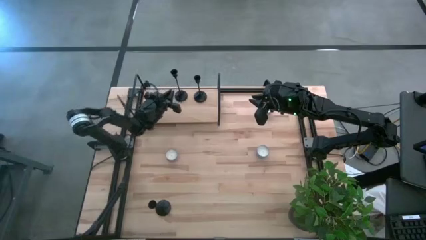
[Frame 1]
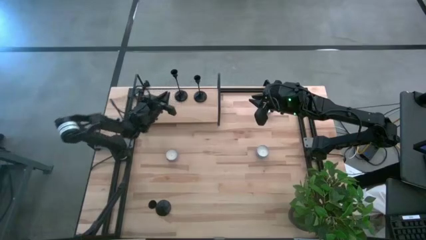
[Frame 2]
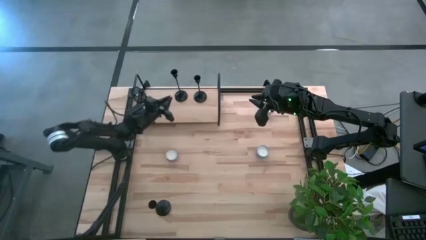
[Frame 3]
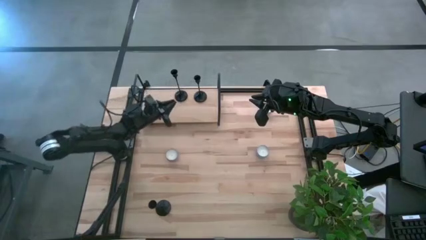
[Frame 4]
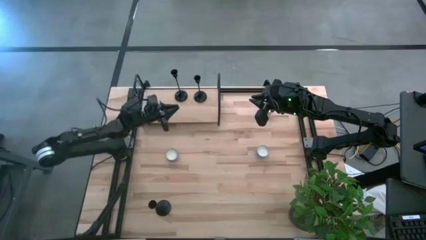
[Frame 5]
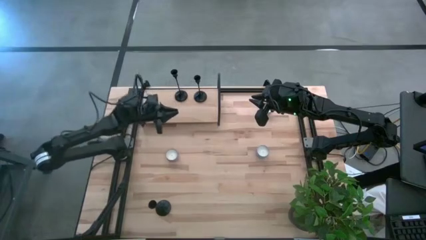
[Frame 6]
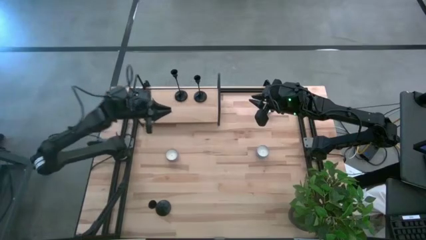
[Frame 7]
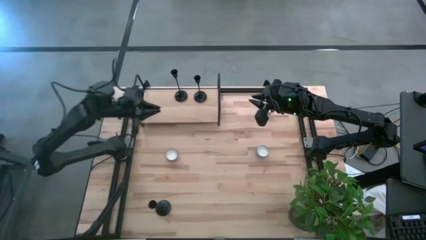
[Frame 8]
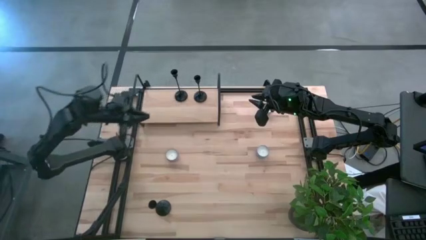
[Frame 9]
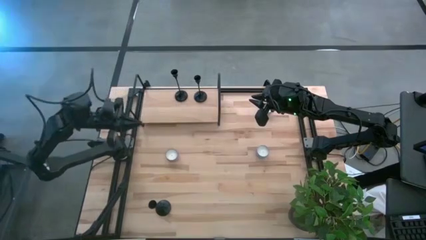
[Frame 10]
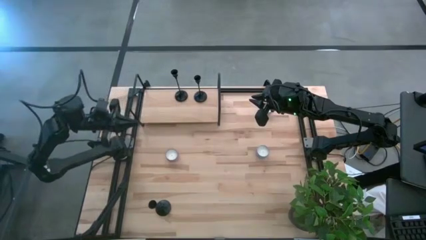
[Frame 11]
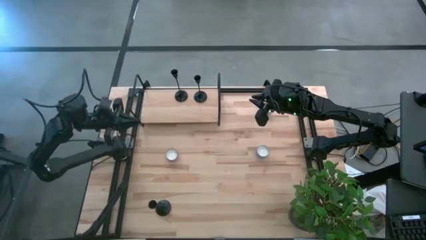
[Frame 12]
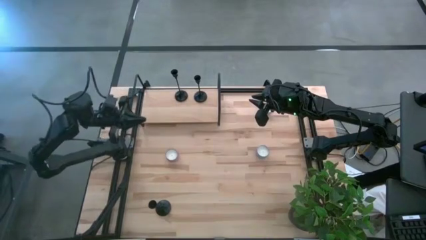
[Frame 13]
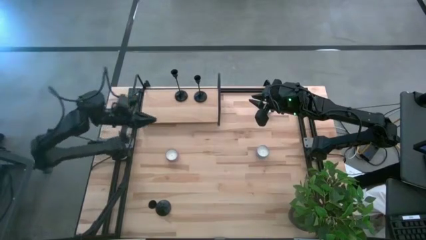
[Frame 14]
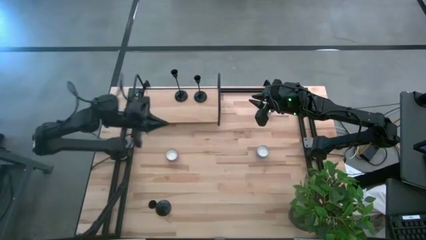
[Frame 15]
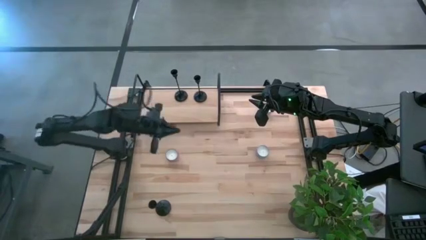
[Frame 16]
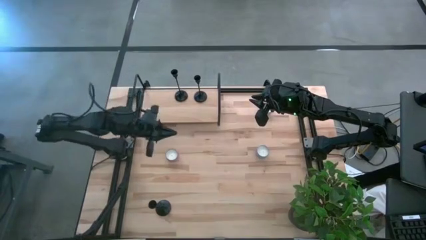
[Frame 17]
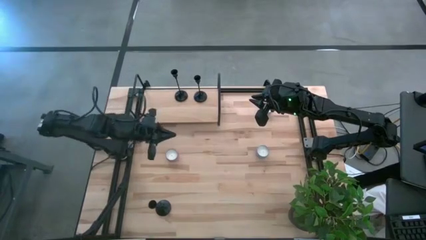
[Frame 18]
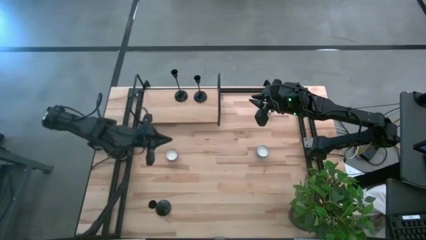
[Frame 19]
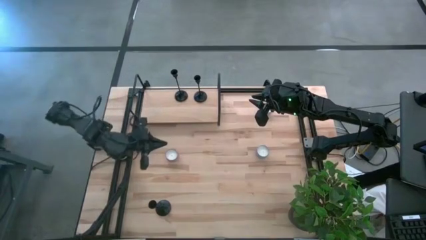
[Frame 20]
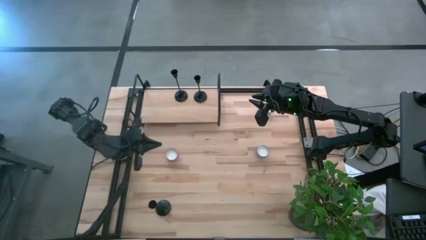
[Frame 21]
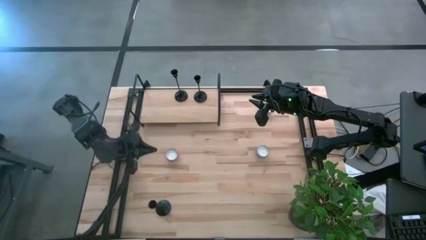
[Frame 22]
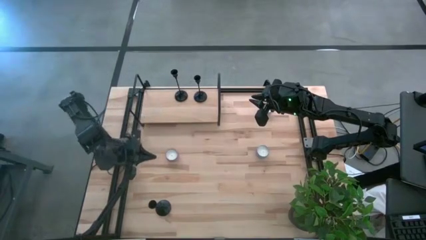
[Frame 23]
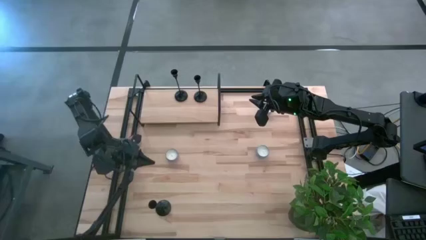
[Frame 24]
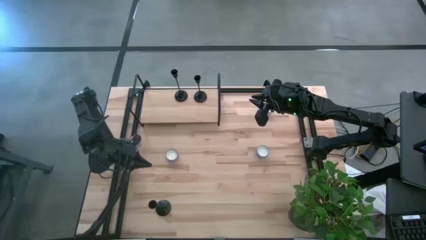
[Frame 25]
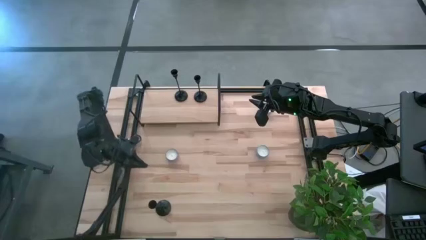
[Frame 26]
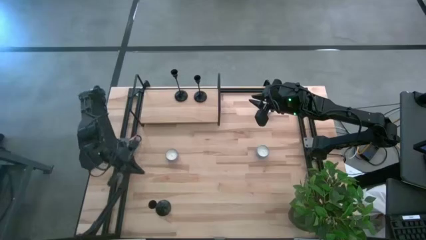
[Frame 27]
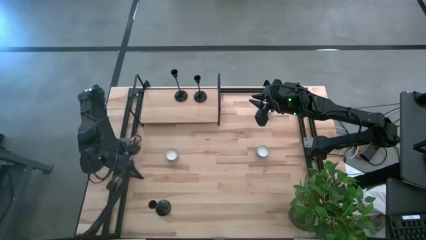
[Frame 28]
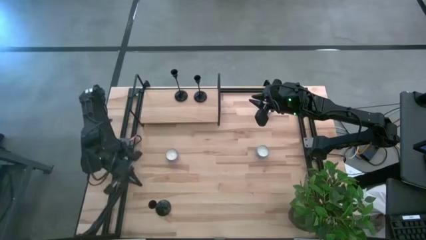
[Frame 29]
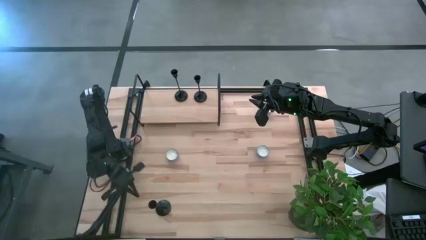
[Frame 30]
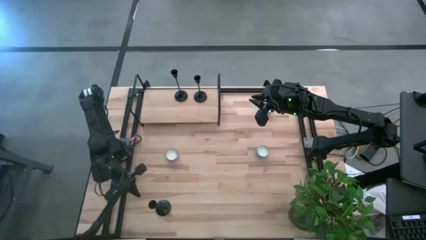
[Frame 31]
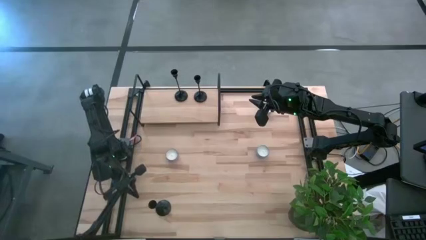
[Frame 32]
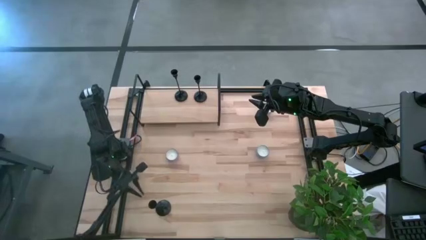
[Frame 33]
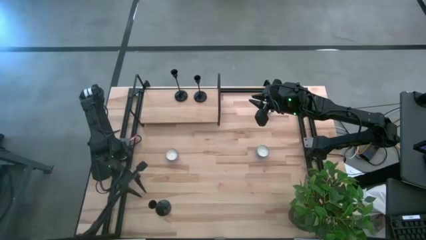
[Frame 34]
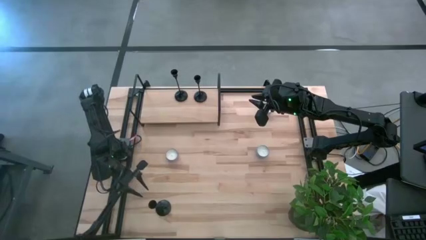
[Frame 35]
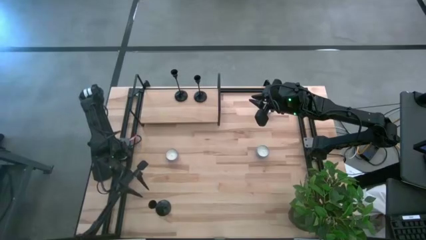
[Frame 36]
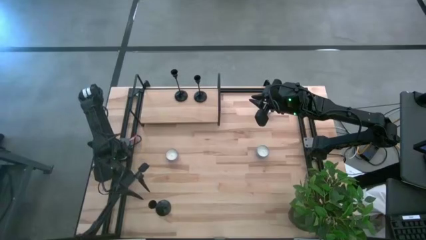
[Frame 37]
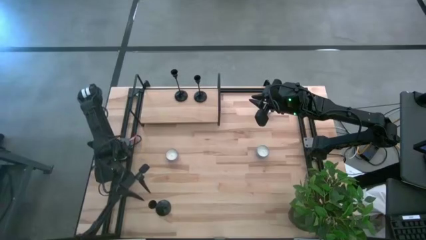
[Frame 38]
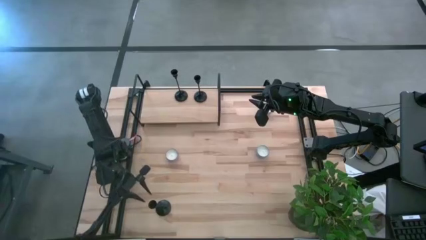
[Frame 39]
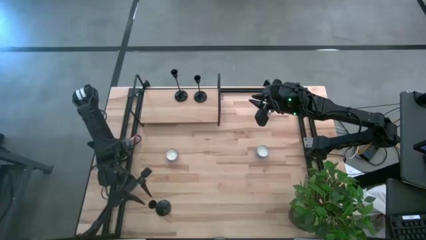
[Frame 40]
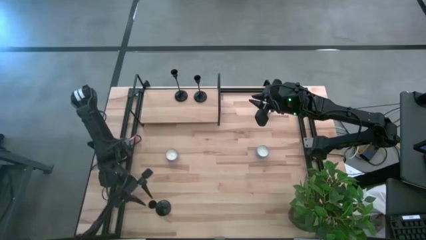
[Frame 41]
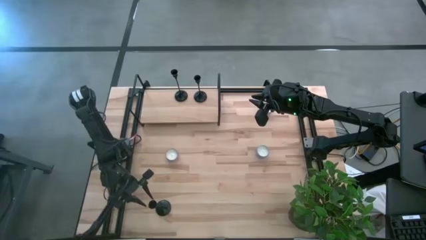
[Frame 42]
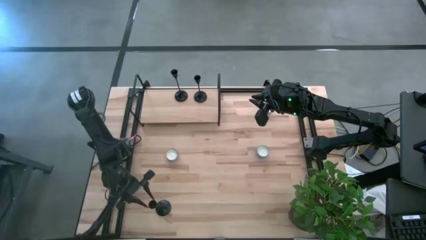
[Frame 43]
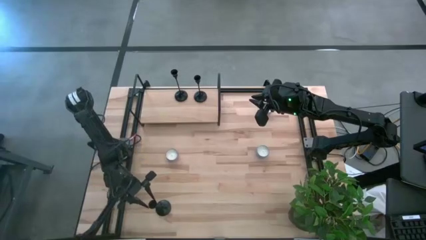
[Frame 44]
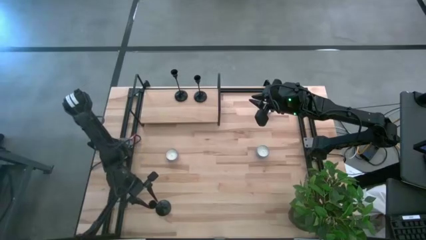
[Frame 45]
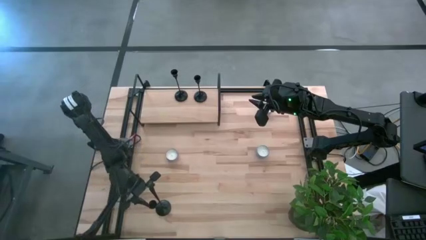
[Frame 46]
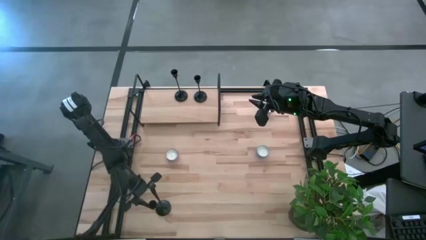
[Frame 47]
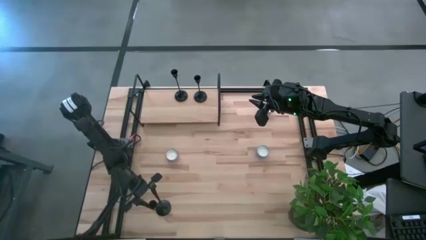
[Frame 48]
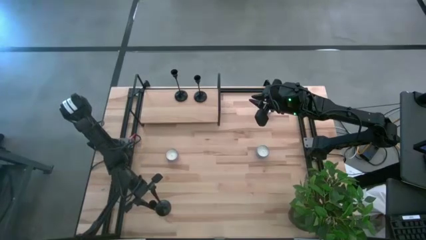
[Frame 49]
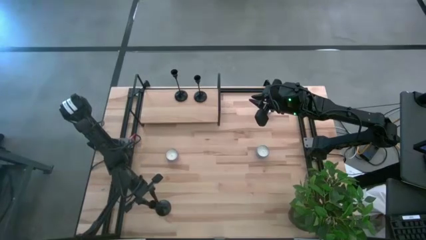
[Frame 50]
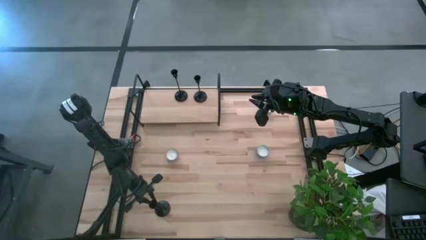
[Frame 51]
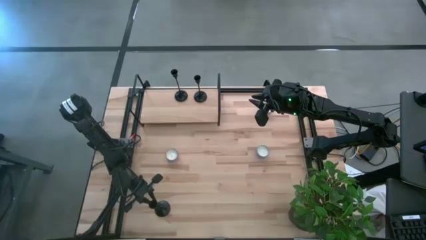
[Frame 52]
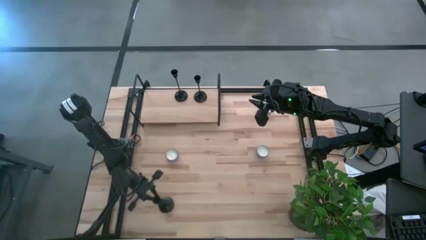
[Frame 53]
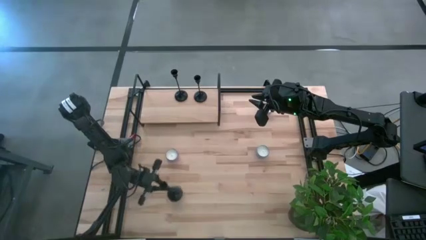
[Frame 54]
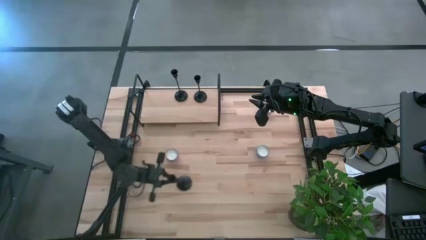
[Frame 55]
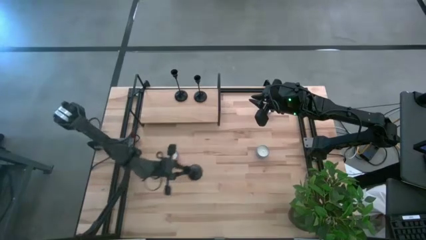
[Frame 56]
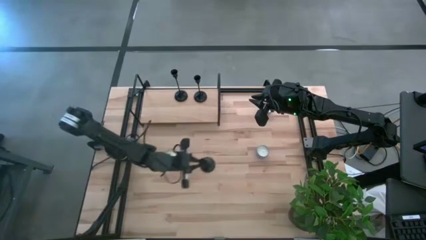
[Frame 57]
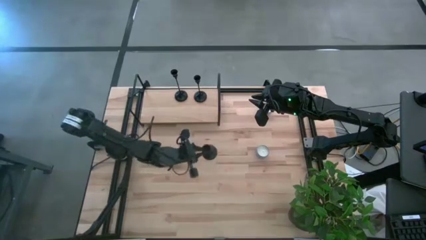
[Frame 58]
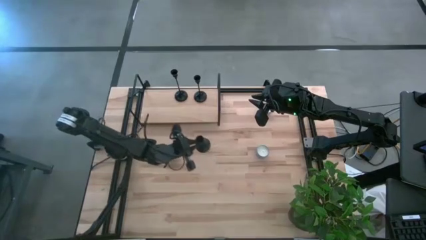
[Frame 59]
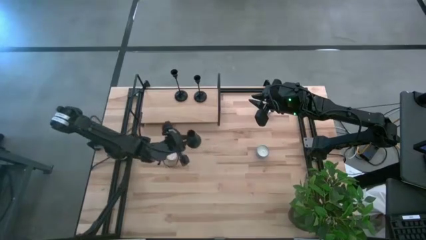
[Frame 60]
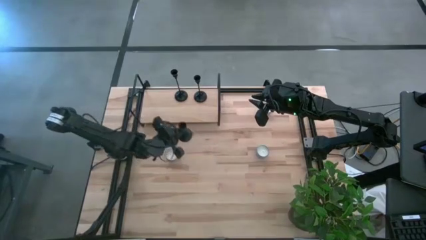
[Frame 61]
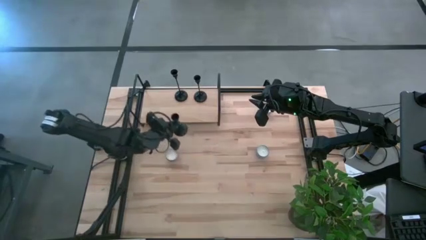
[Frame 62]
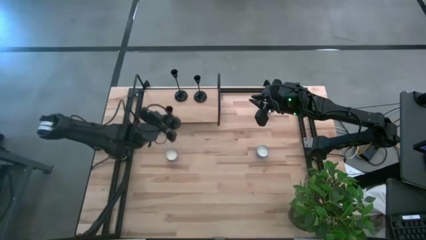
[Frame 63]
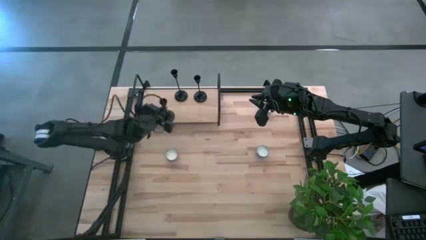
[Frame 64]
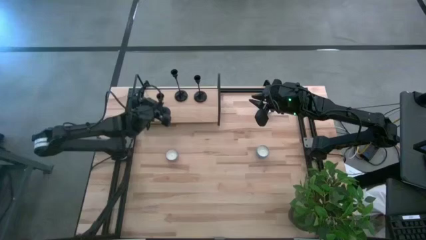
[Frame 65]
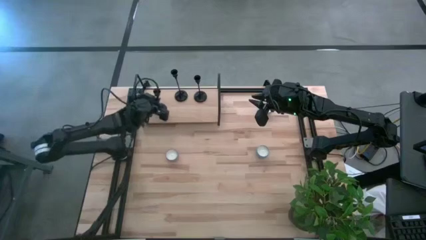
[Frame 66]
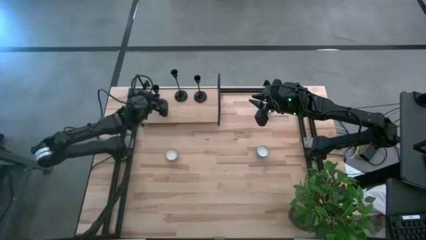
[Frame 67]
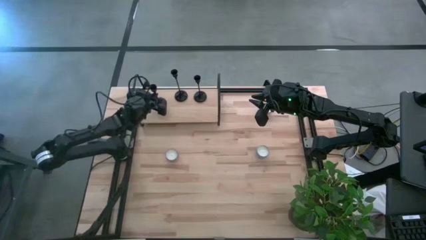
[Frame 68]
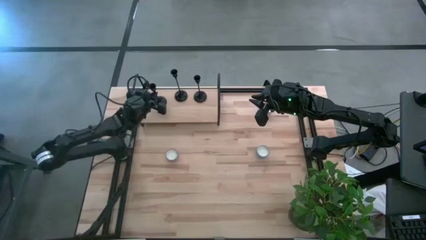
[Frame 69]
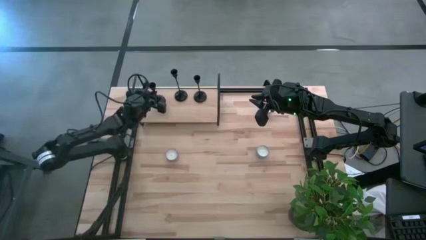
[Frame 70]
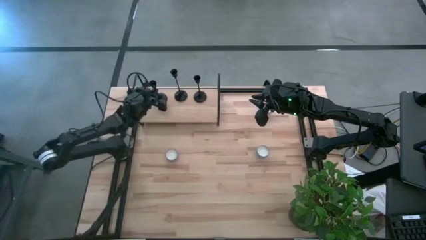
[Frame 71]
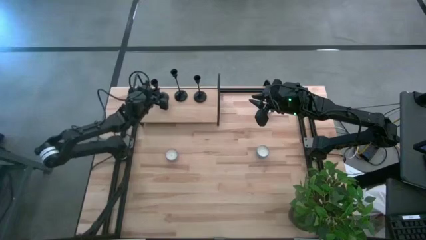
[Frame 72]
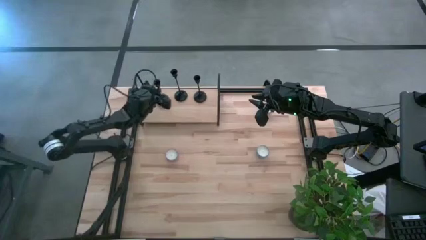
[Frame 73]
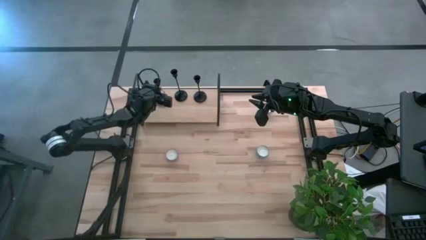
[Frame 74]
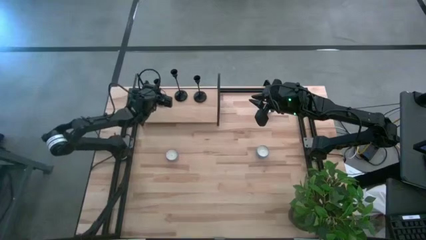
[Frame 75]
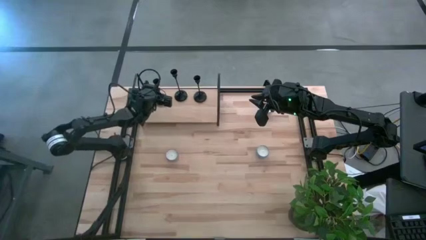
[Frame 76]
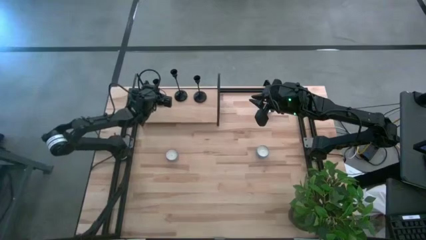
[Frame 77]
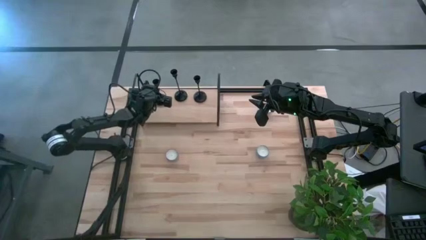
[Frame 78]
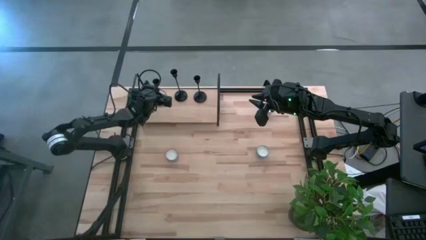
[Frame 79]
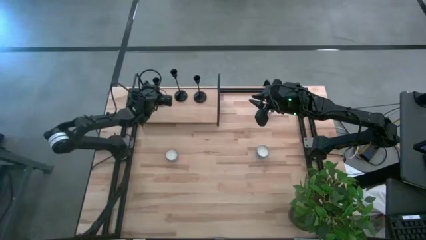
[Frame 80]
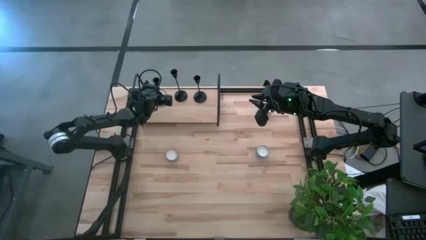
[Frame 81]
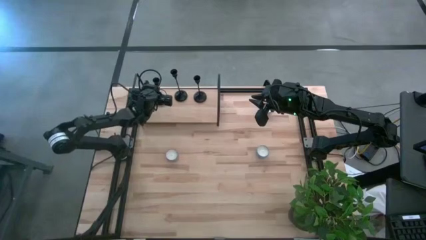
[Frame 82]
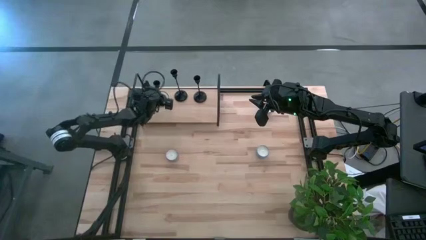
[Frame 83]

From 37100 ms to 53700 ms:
Task: Pick & Place candle stick holders
Align the black candle holder with the black candle holders on the shelf
